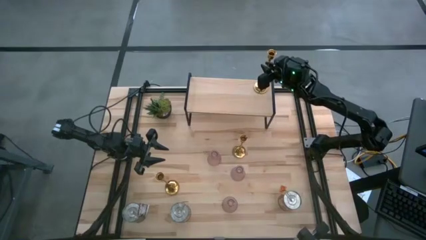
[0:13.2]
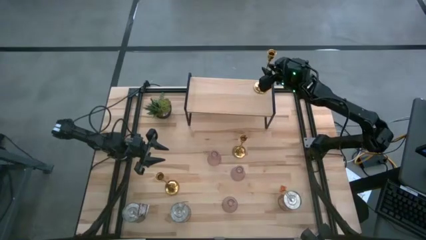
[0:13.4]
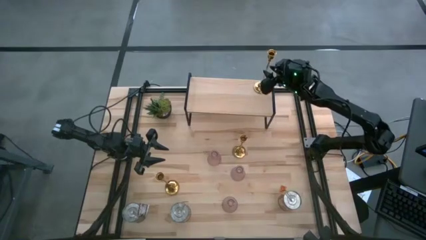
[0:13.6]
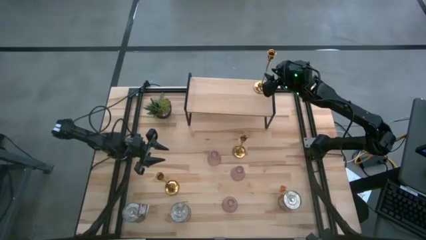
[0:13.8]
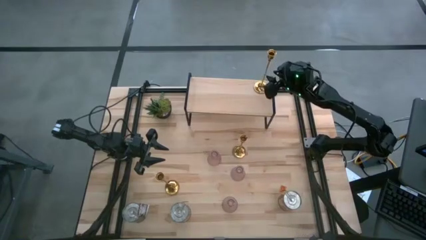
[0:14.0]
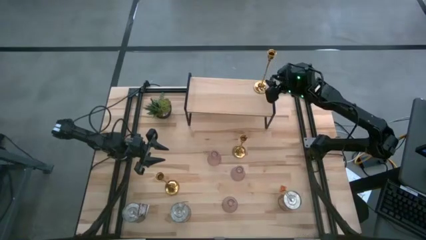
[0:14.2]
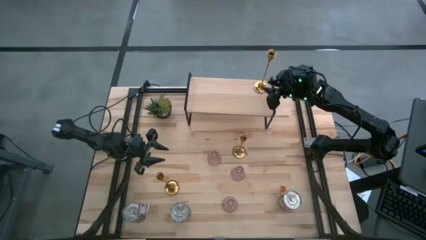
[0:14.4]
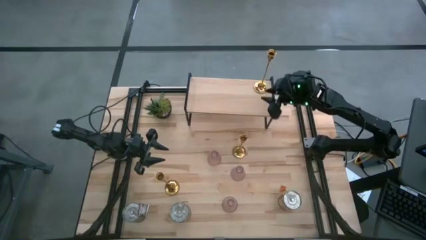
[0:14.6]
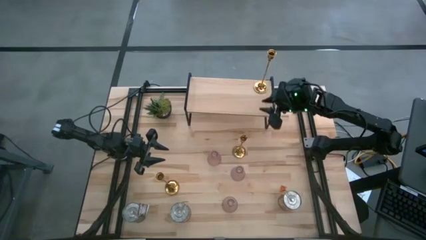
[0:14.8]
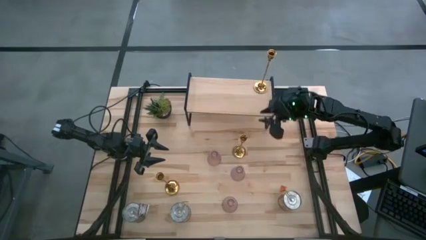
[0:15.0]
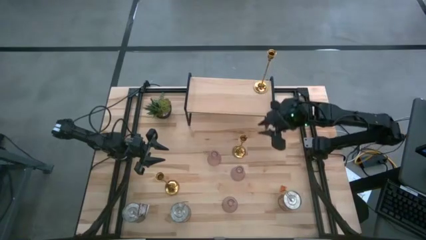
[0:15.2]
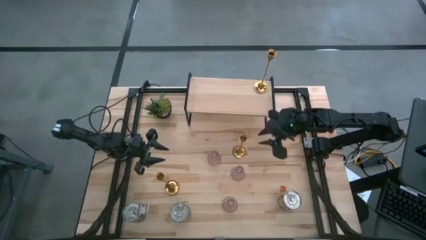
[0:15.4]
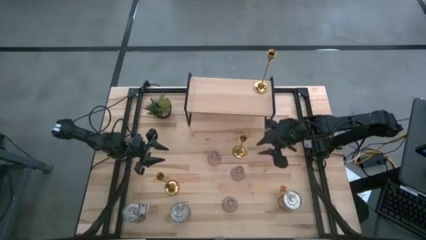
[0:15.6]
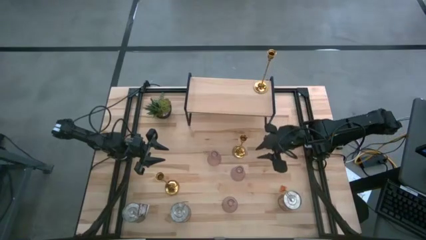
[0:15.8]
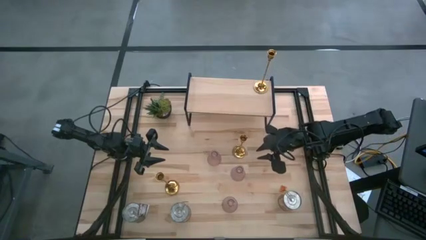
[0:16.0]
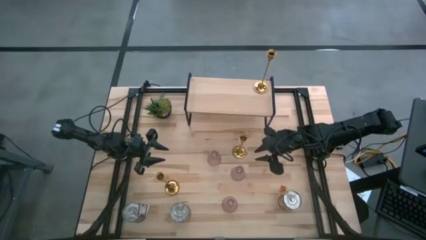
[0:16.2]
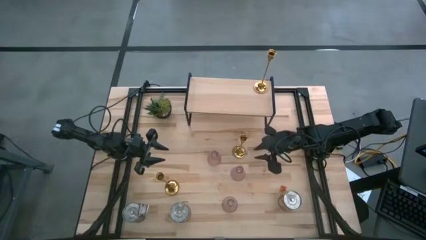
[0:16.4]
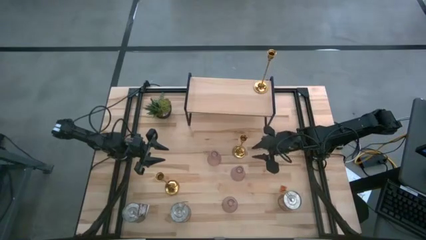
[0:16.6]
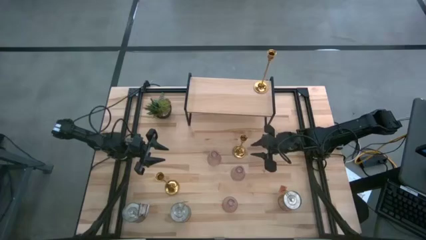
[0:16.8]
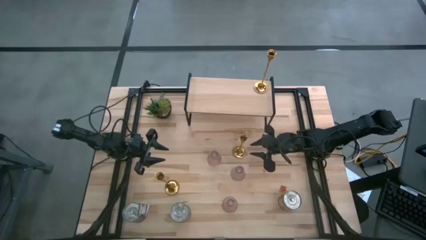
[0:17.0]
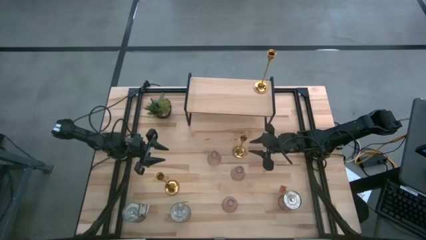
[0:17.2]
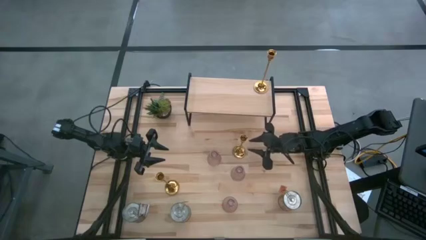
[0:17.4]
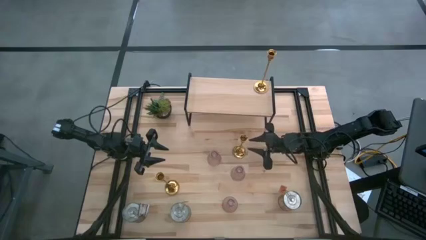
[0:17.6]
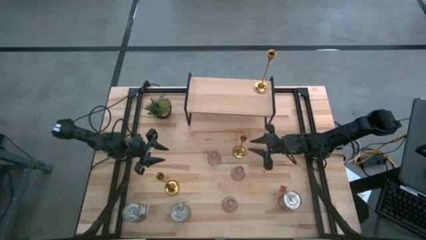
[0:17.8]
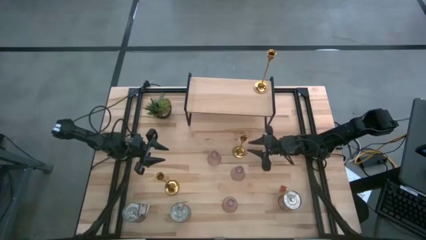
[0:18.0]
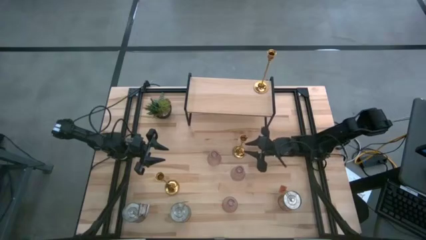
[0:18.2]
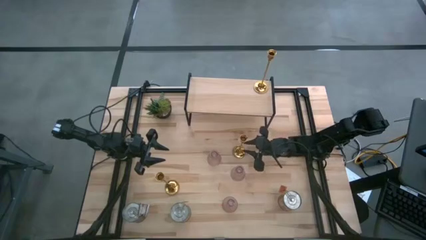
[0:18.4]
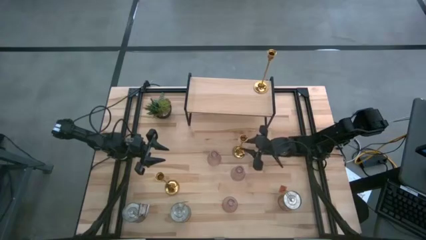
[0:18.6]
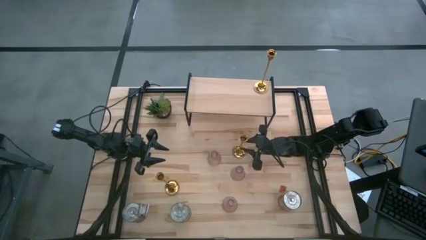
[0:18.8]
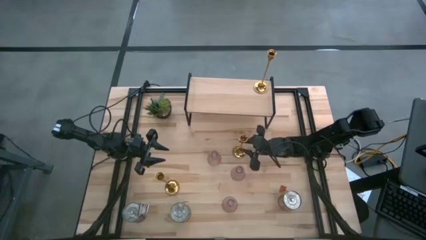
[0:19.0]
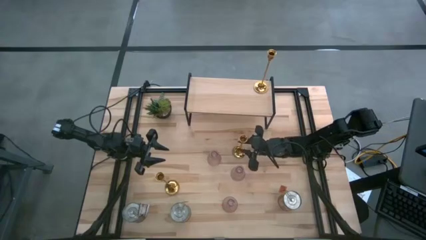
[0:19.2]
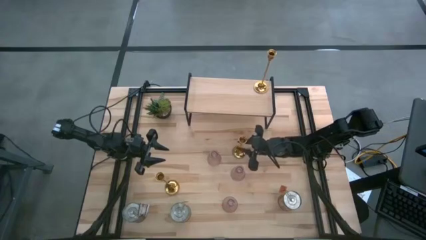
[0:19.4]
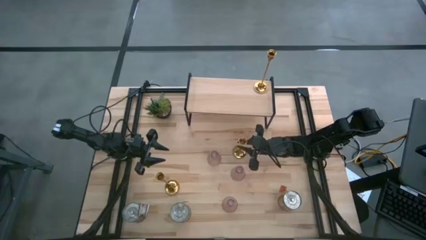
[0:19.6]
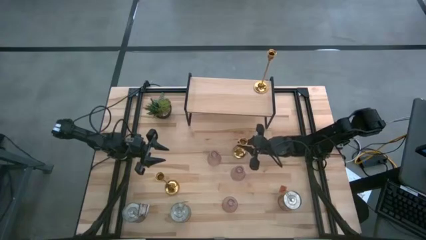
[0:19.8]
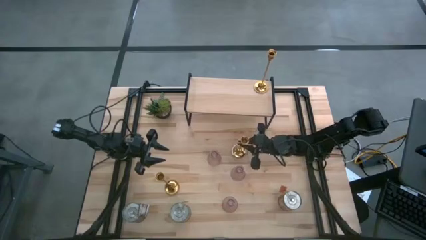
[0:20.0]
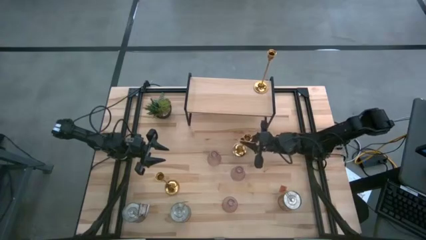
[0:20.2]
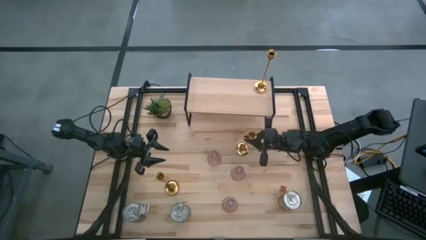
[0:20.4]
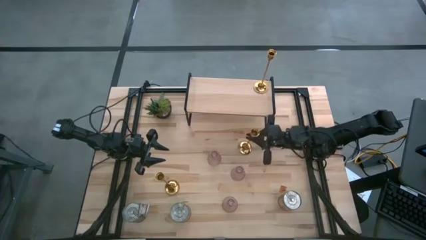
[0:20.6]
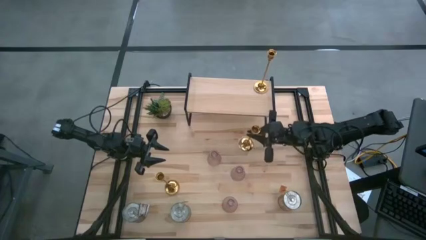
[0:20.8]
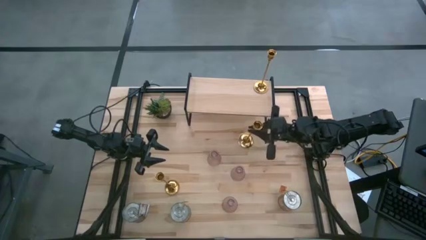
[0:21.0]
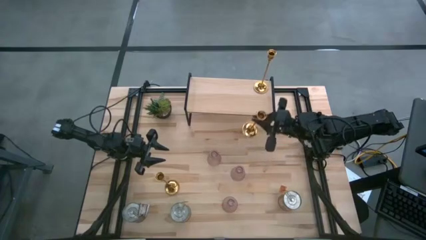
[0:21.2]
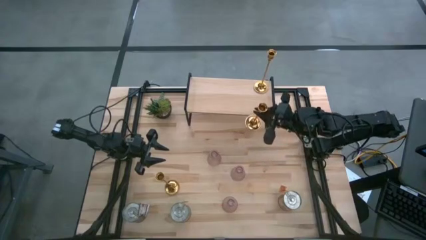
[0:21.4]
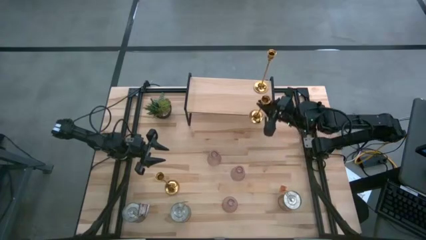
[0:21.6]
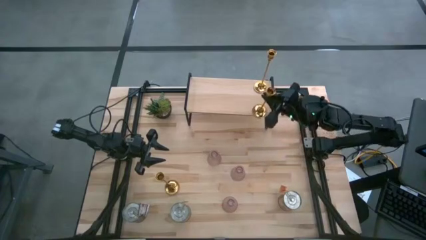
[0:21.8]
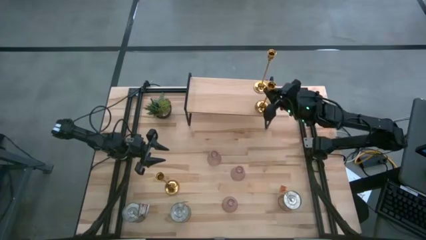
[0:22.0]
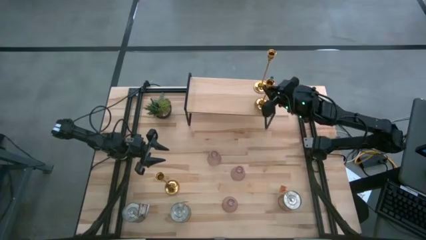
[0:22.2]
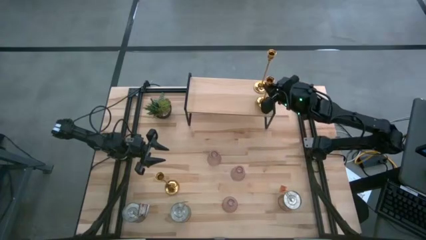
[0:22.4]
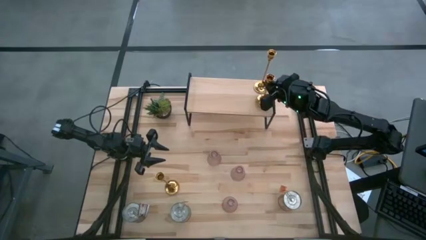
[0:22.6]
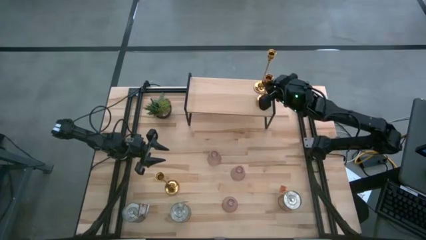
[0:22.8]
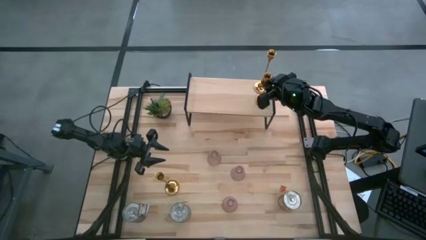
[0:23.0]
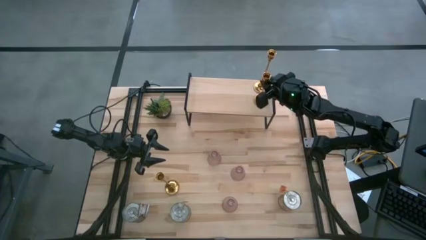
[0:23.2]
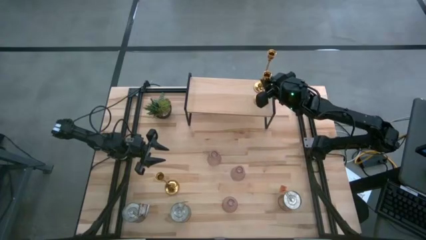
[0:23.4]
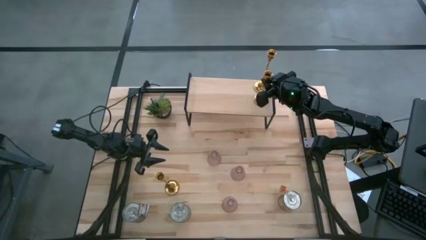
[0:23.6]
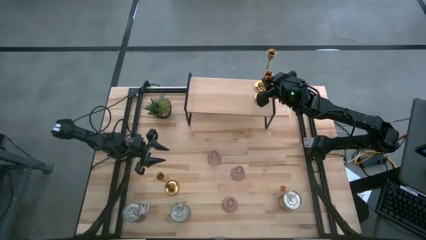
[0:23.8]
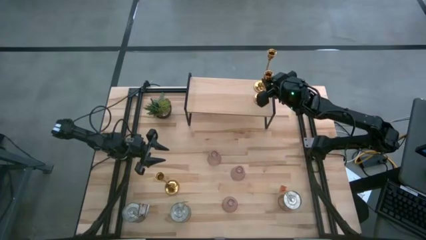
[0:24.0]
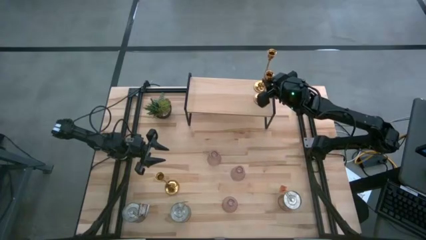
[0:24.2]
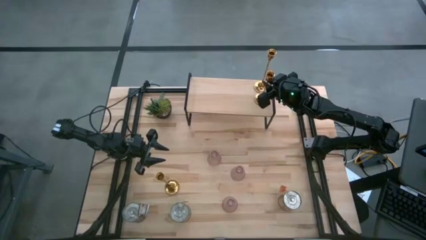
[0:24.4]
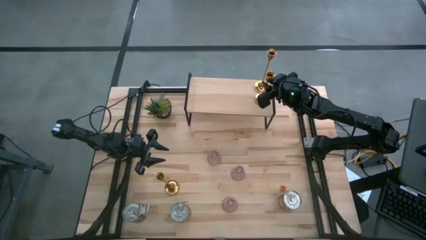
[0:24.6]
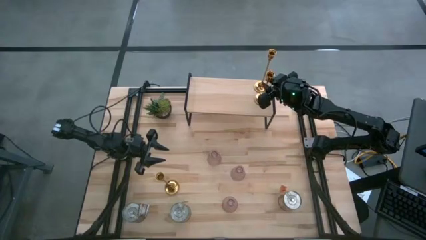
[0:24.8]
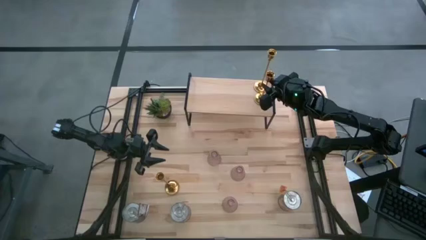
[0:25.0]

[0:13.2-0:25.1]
Task: Pick & Place candle stick holders
Align the top gold candle holder on the shelf with the gold candle holder

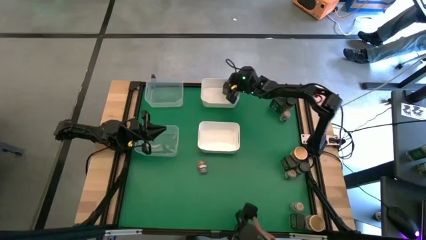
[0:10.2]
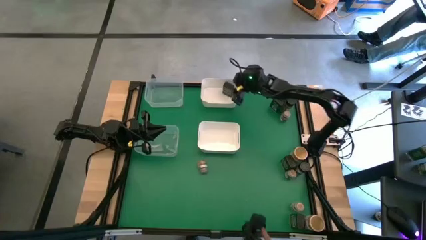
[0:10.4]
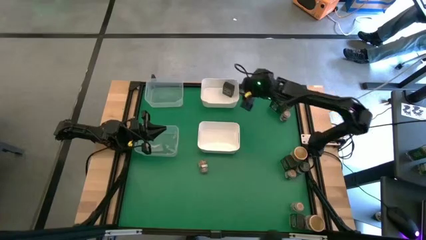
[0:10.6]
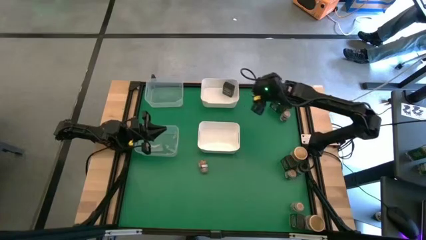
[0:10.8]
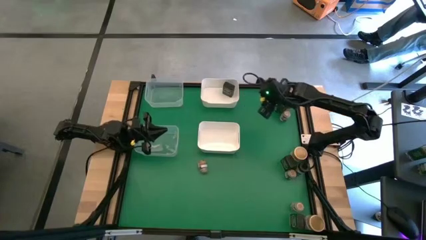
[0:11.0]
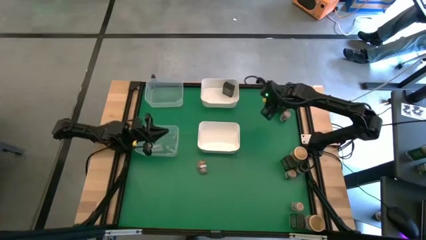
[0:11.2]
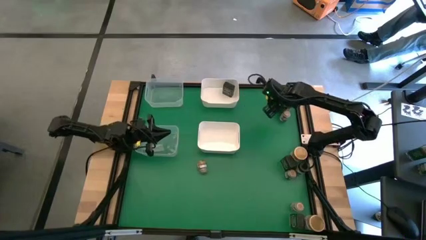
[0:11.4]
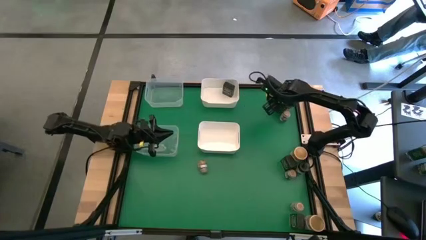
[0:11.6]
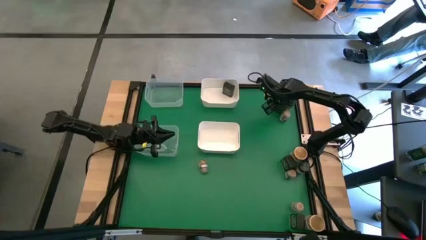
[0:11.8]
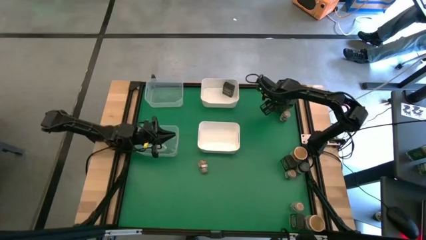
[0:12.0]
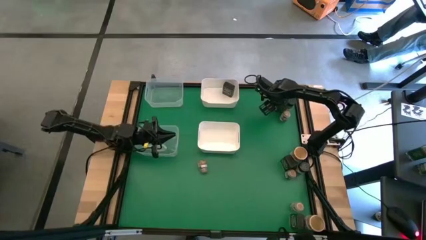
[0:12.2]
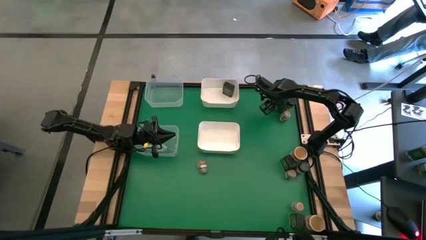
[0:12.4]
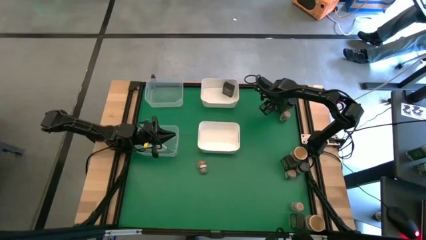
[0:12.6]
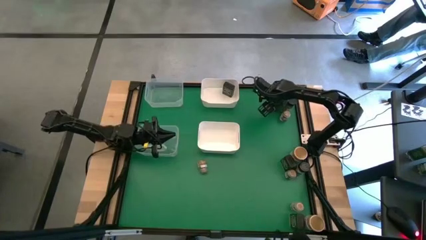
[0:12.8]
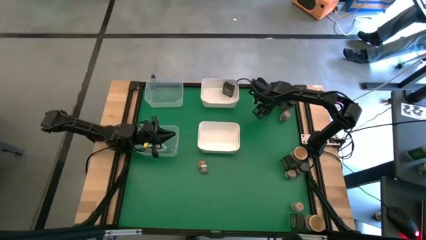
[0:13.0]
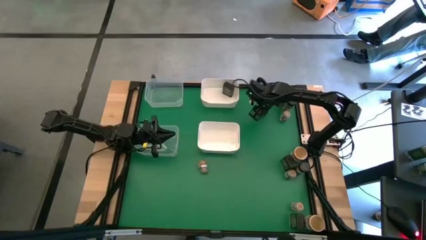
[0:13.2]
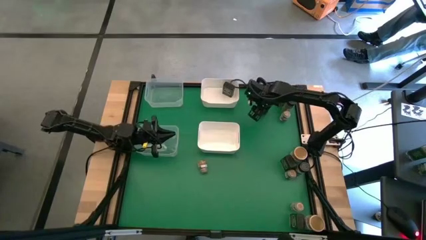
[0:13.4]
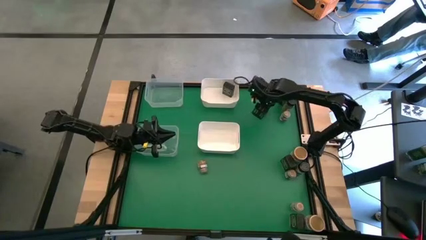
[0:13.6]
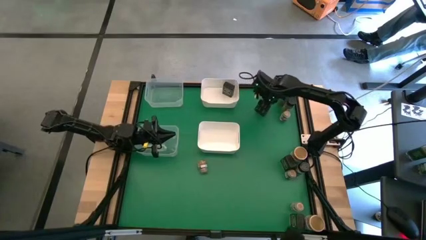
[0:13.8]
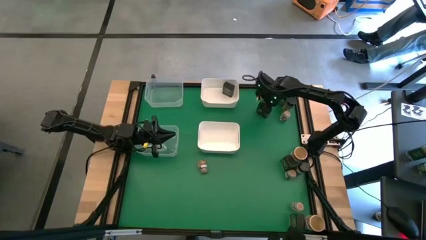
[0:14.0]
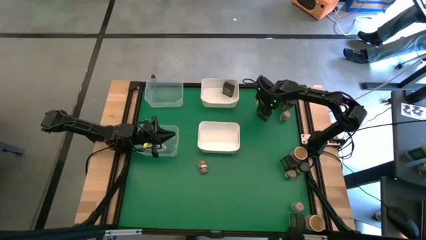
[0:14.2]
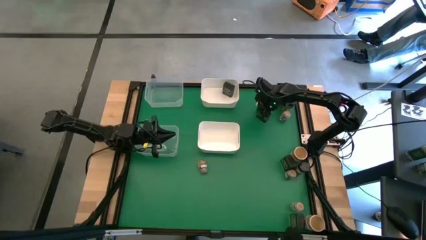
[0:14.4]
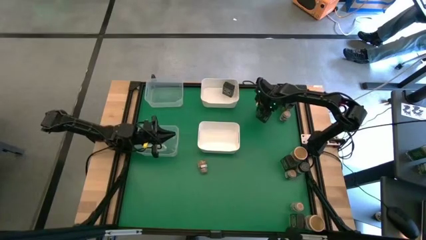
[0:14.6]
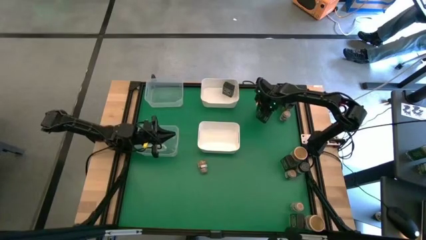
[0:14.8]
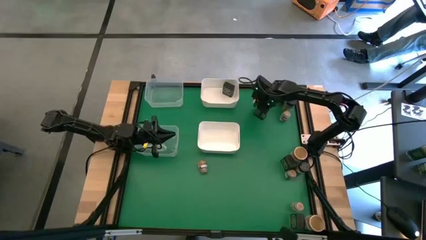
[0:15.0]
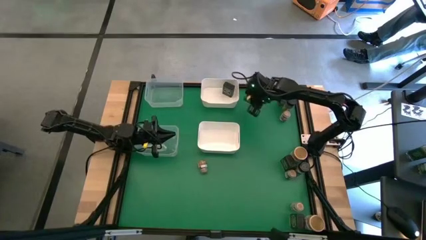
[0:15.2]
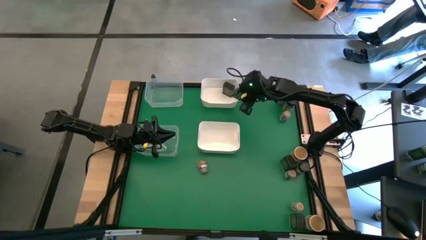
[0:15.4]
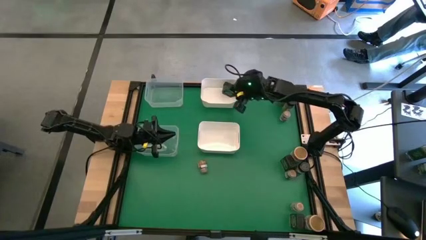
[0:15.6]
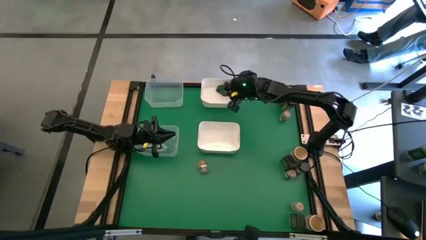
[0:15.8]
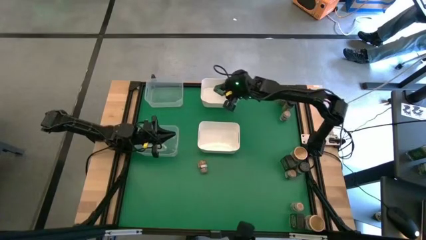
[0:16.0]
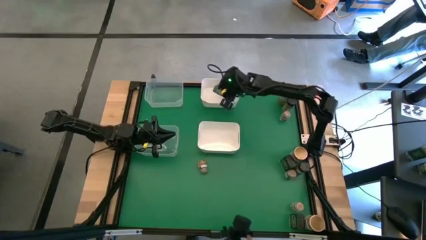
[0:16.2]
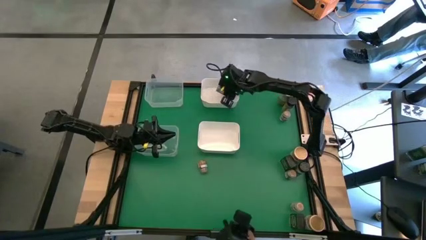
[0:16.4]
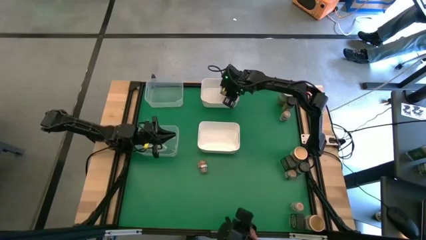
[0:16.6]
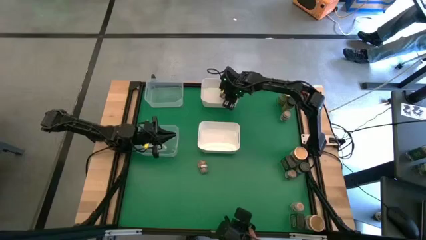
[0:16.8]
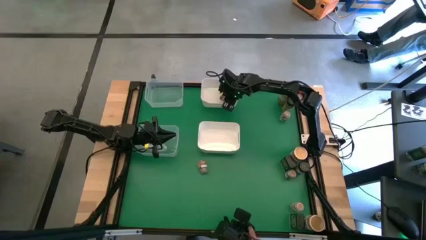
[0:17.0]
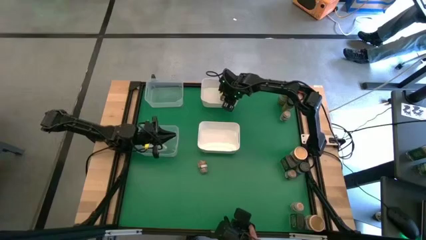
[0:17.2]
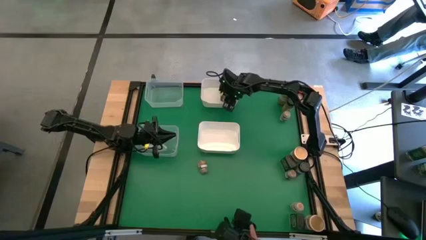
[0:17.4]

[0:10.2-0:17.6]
Task: Sort spices by type
Put the top black seasoning can into the top white bin
